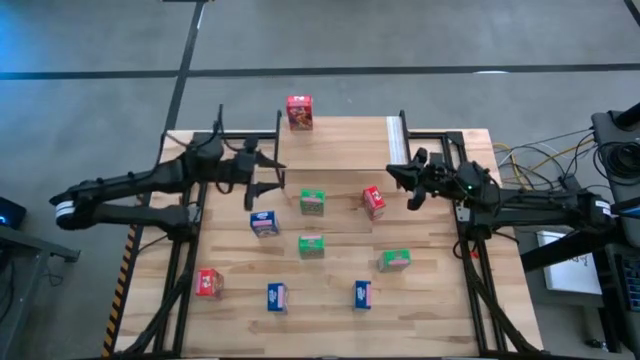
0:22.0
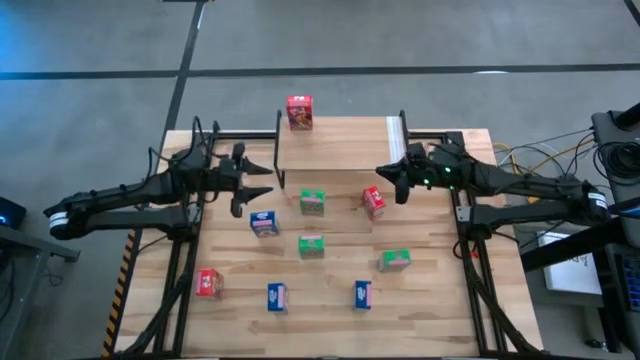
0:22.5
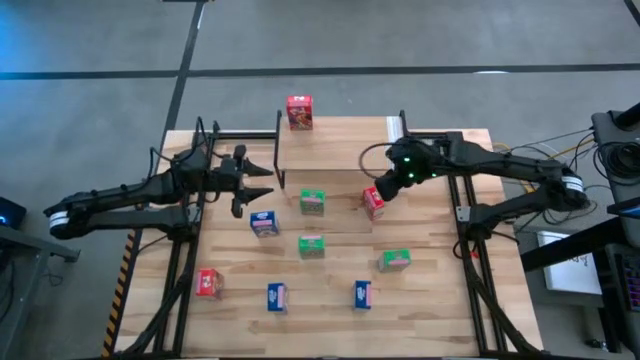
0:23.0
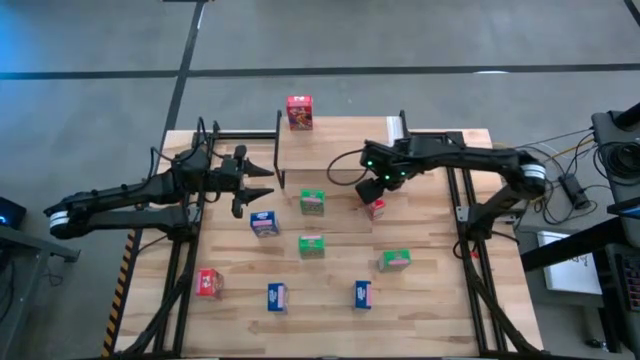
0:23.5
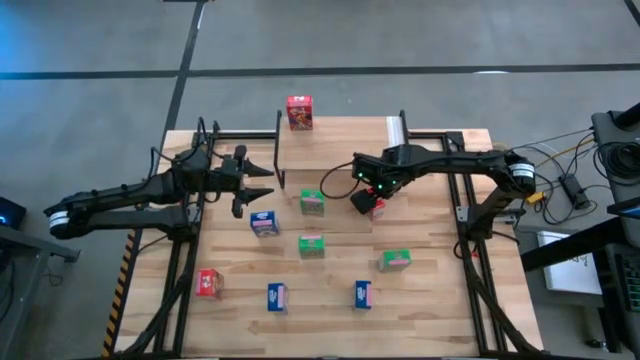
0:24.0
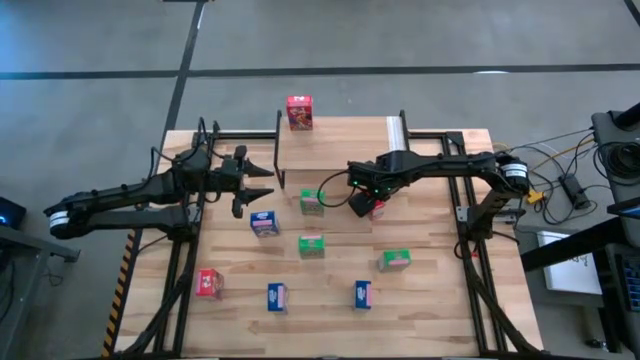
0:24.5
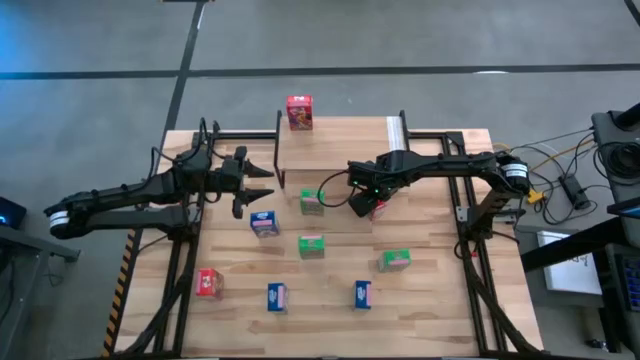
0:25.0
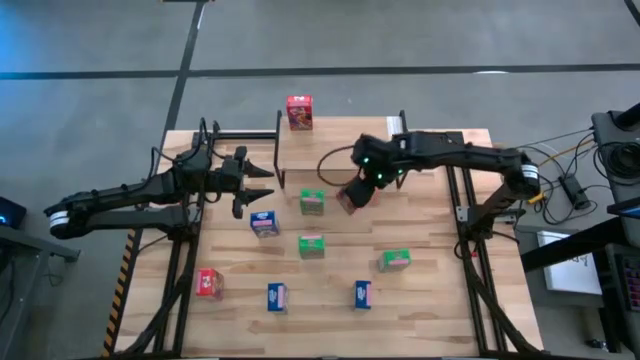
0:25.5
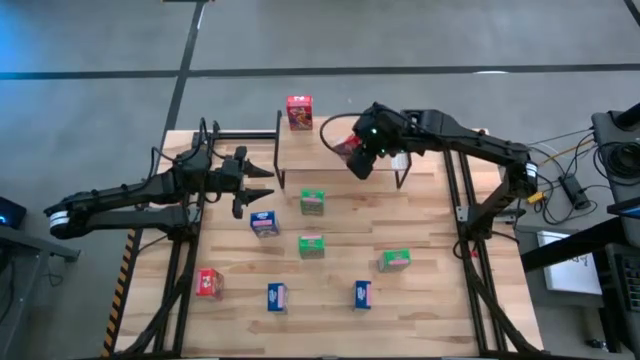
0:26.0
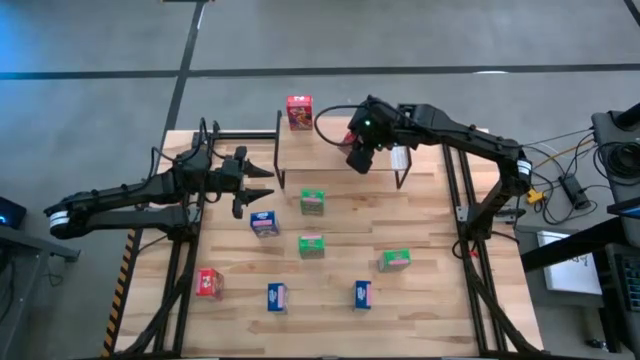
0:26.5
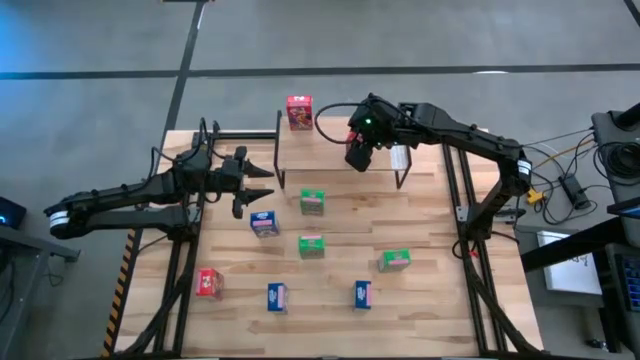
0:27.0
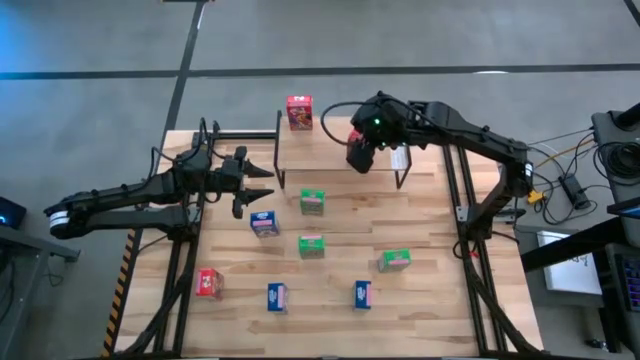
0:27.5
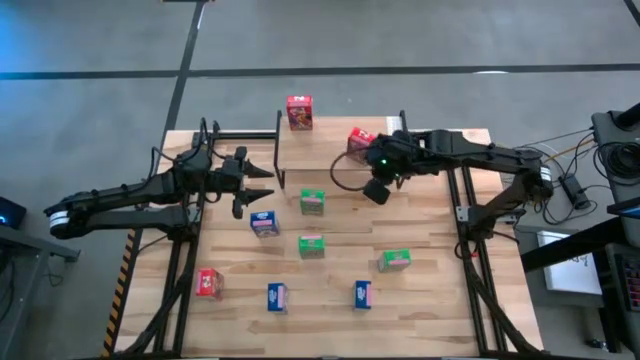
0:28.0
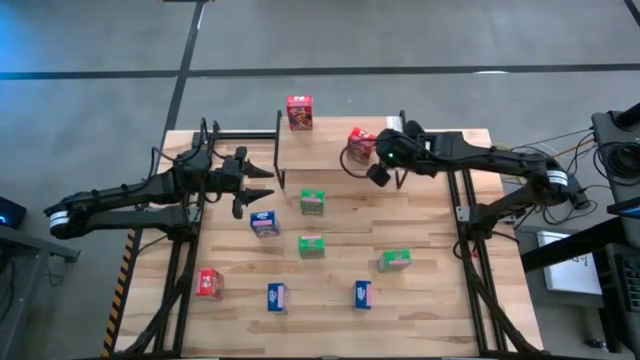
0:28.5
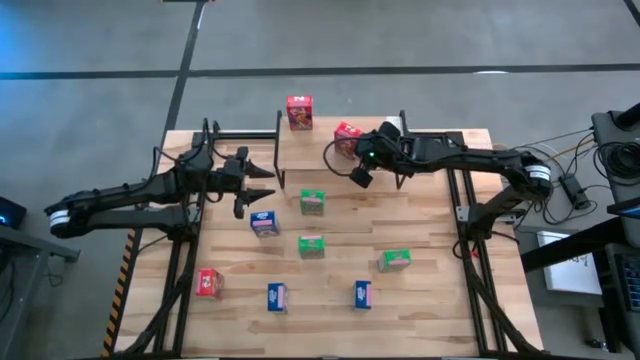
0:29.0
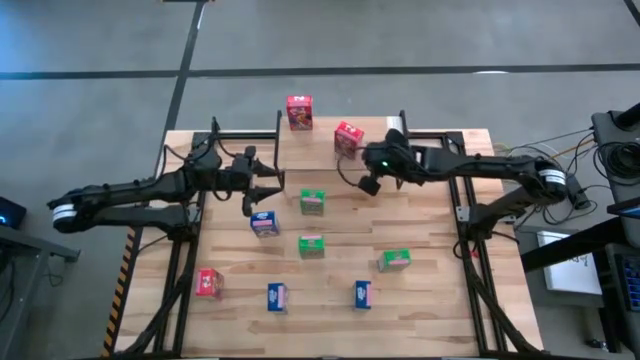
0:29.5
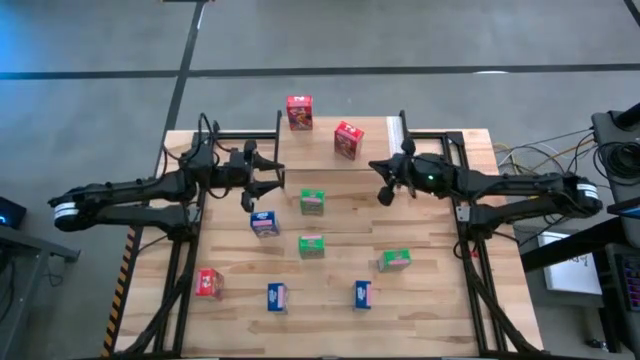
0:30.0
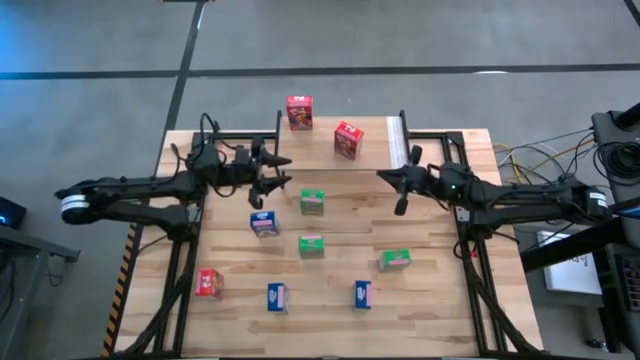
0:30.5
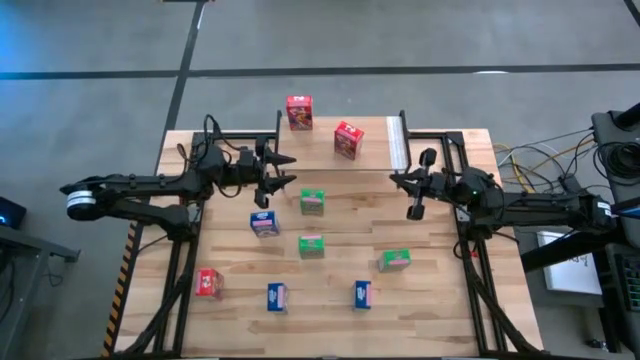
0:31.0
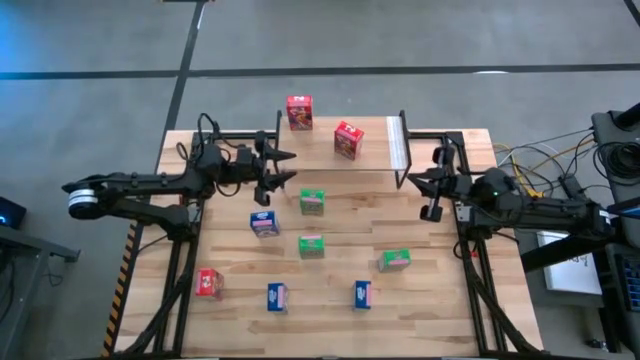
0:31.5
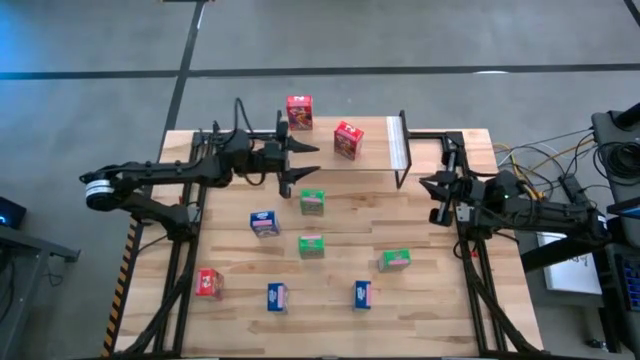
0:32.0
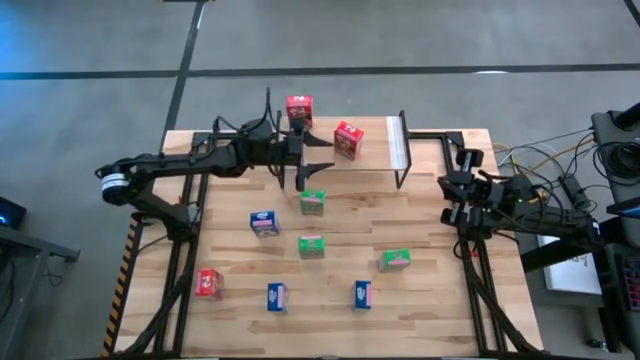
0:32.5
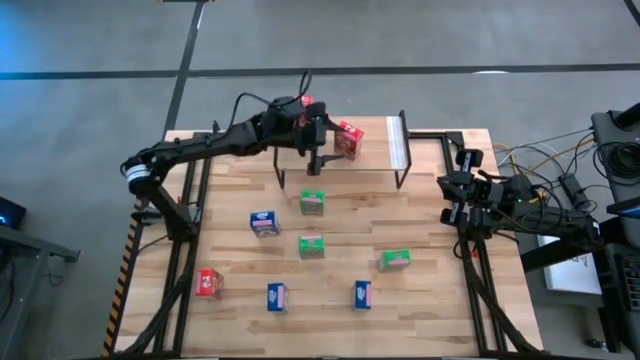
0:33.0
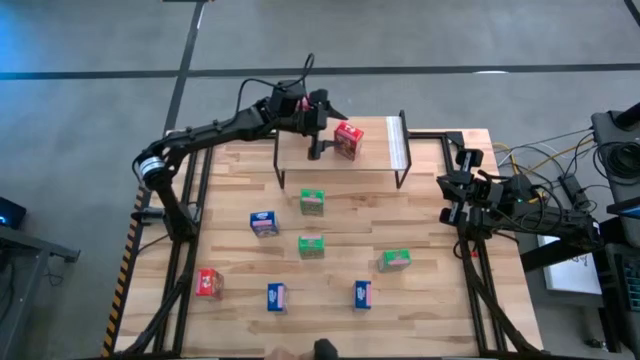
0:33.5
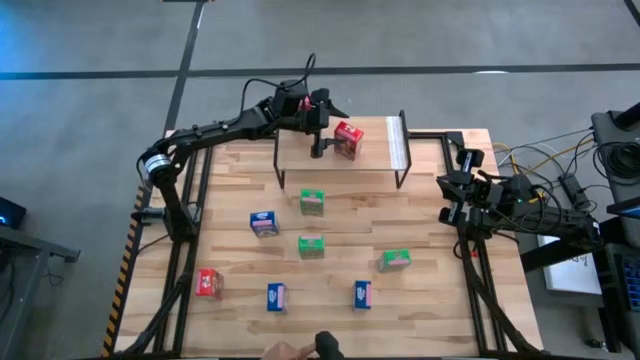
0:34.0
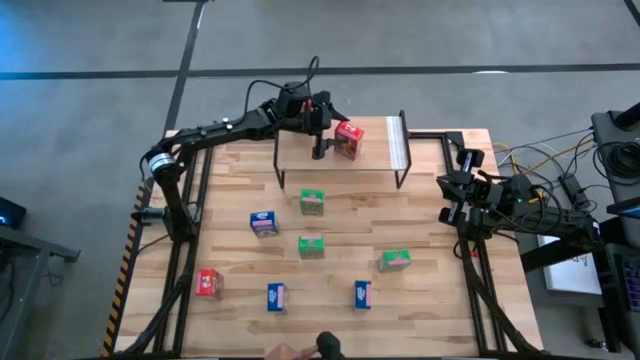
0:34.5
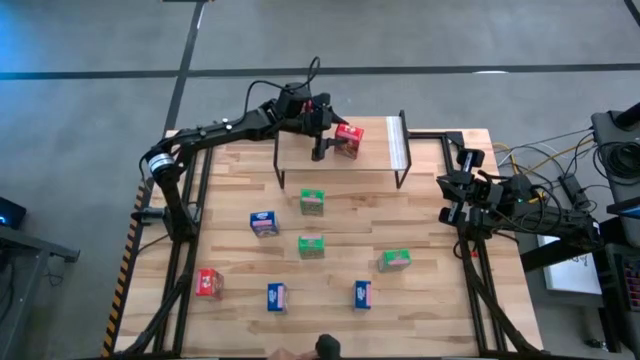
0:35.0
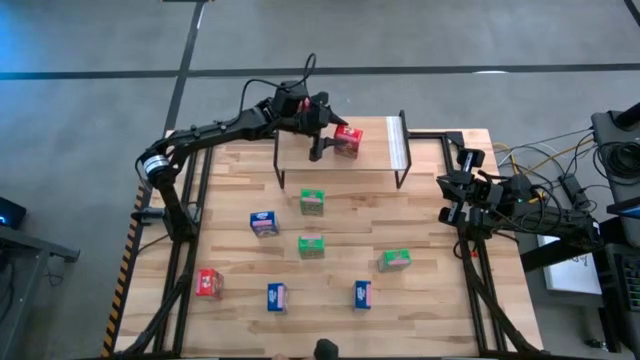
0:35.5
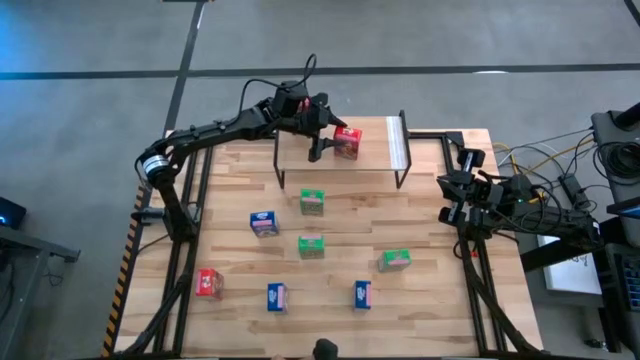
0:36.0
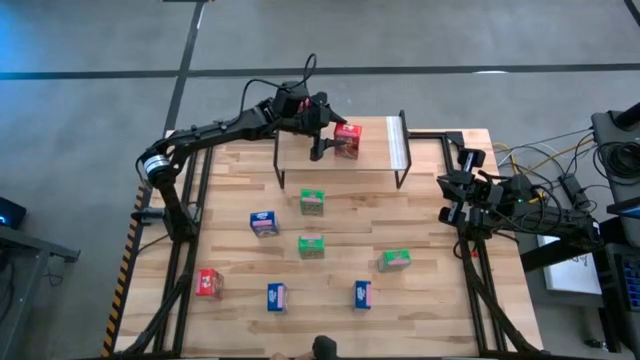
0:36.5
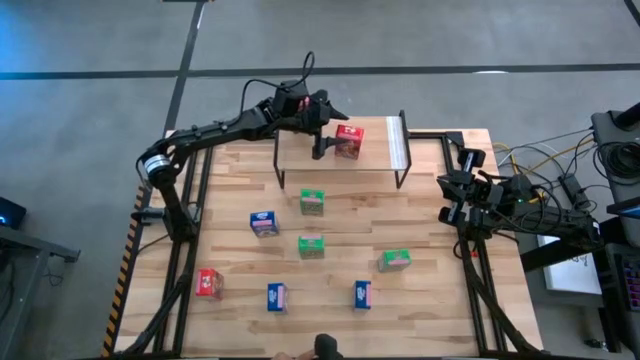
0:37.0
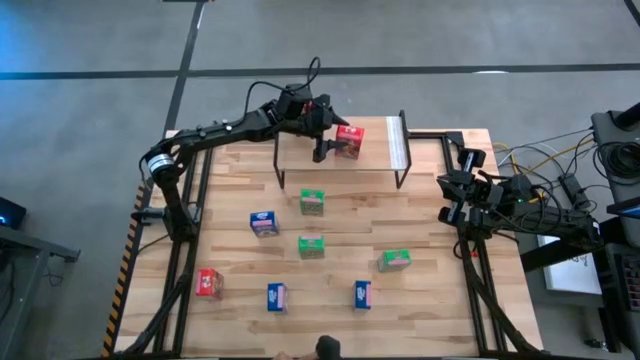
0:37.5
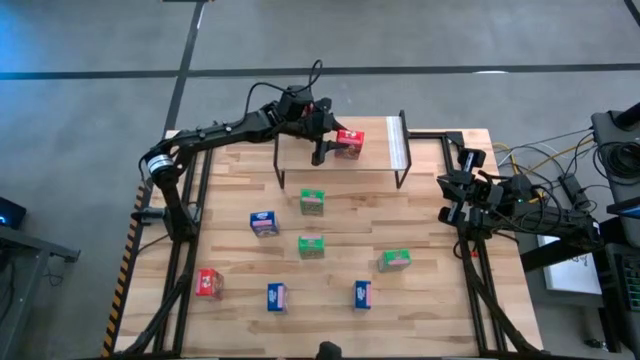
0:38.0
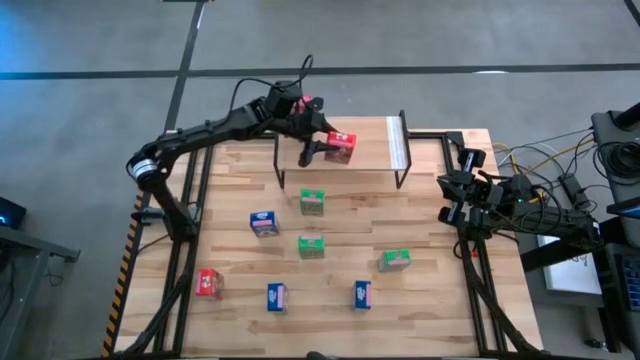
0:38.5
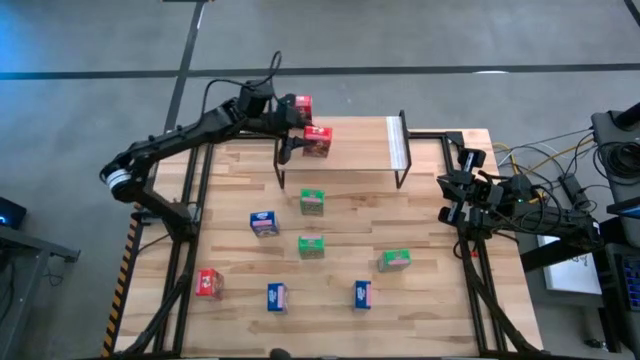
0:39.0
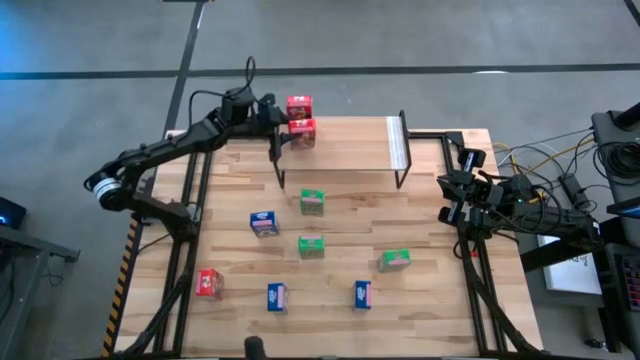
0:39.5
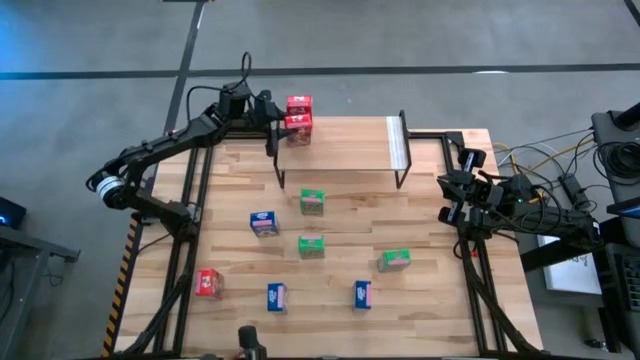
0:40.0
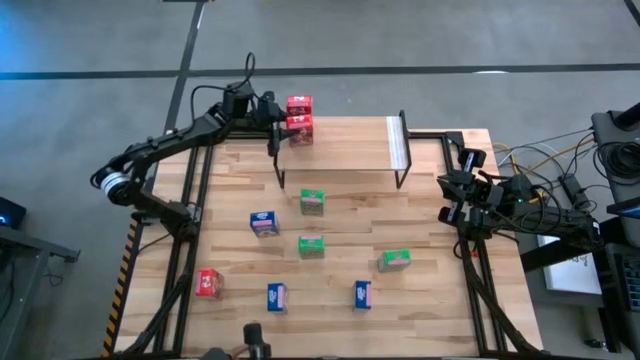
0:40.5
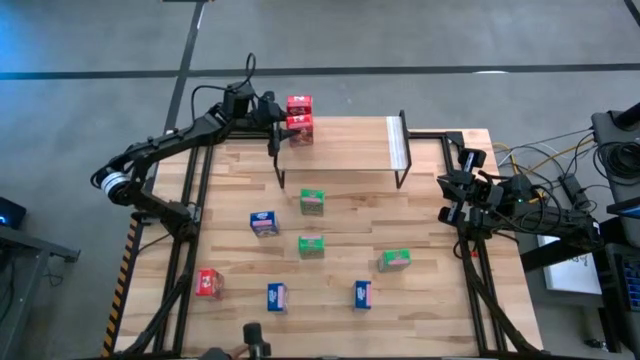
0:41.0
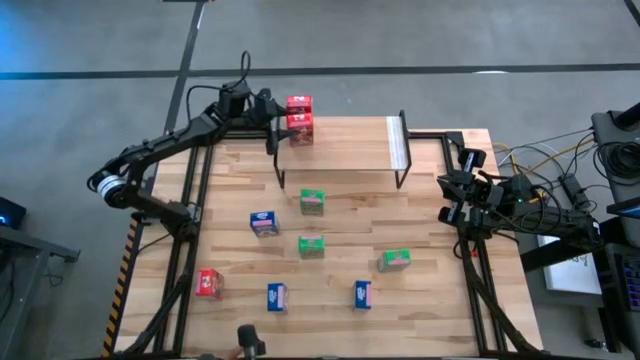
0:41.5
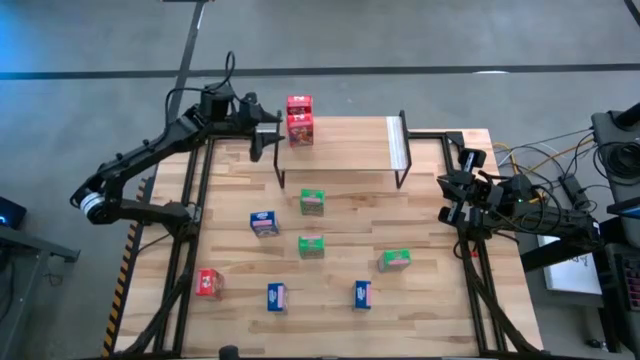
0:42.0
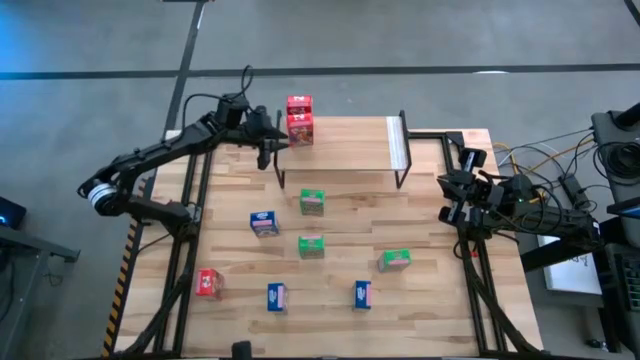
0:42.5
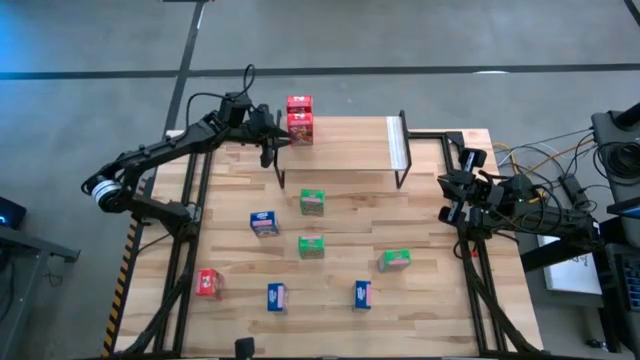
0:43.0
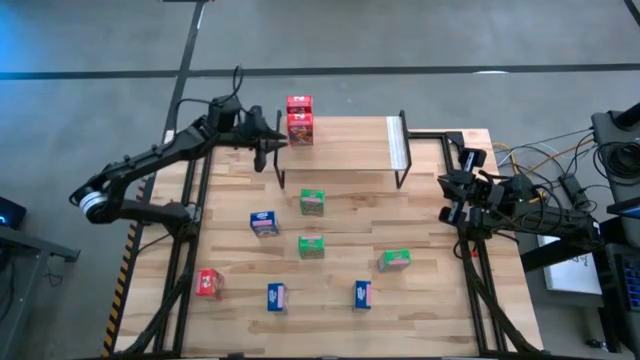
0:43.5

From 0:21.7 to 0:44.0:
Task: Stack cereal on shelf
Put the top red cereal box on the shelf
